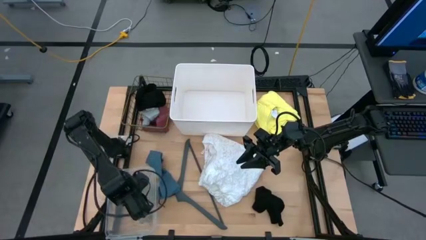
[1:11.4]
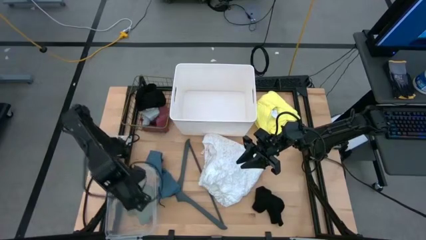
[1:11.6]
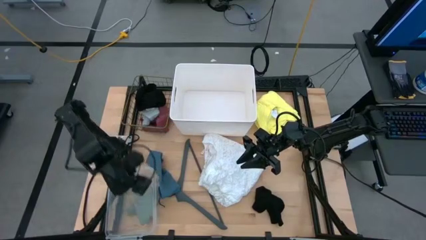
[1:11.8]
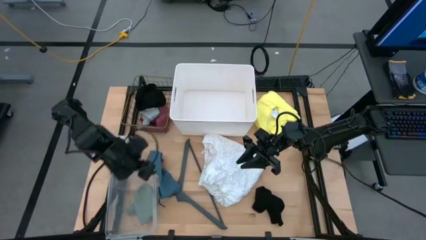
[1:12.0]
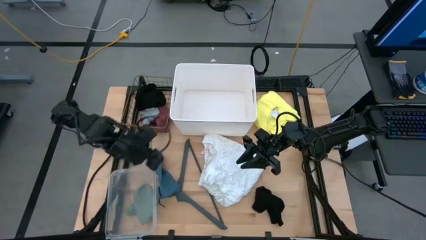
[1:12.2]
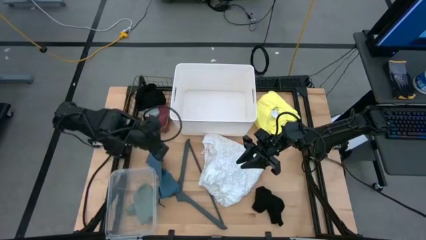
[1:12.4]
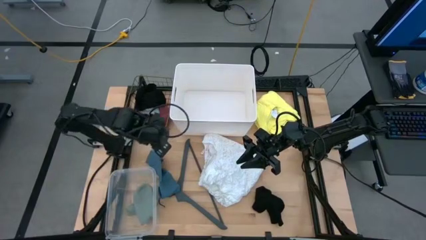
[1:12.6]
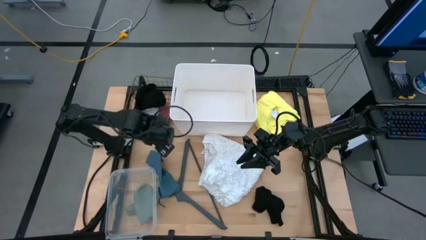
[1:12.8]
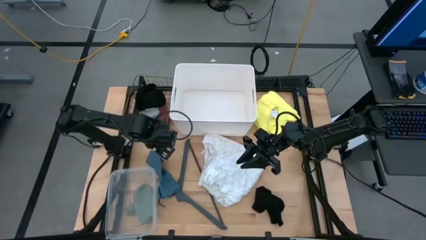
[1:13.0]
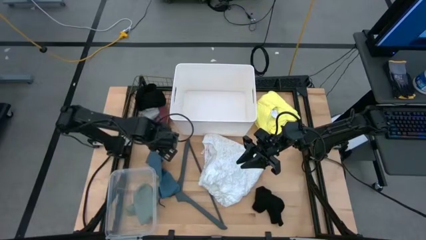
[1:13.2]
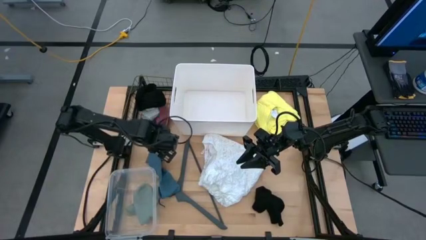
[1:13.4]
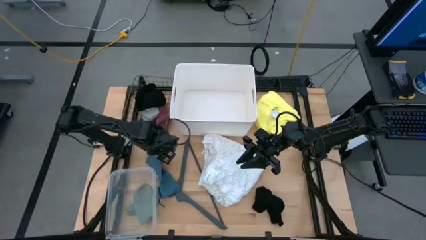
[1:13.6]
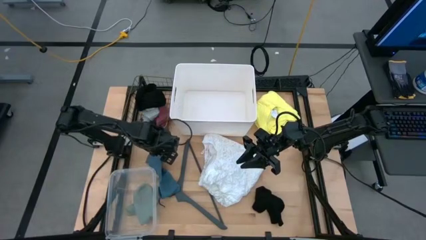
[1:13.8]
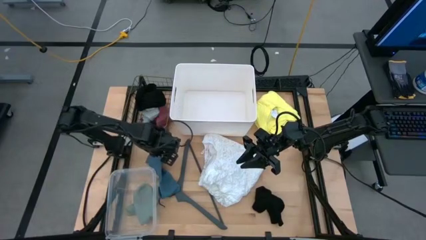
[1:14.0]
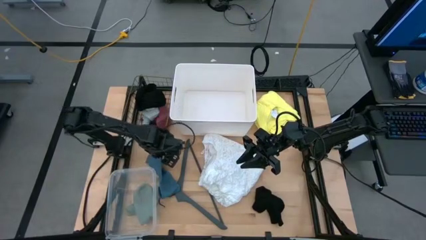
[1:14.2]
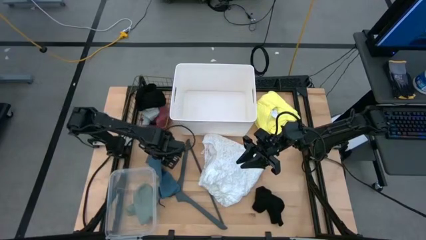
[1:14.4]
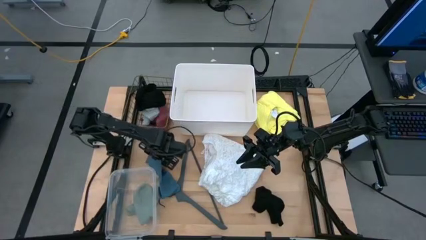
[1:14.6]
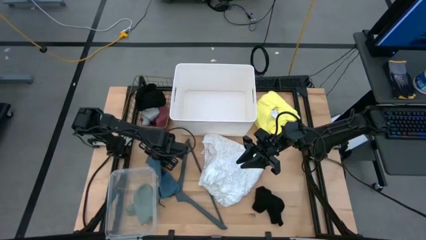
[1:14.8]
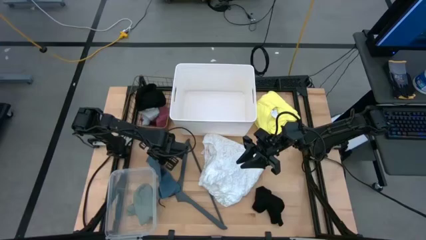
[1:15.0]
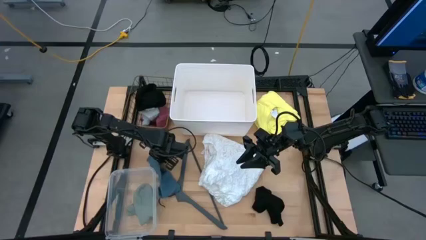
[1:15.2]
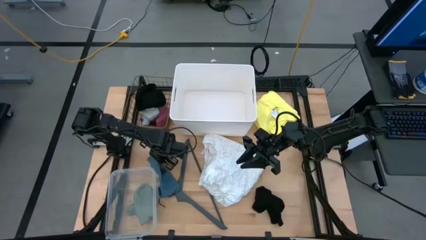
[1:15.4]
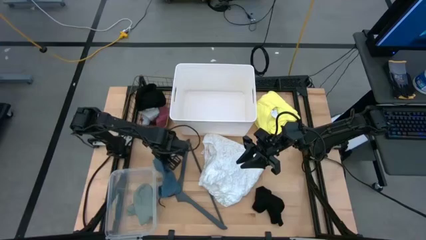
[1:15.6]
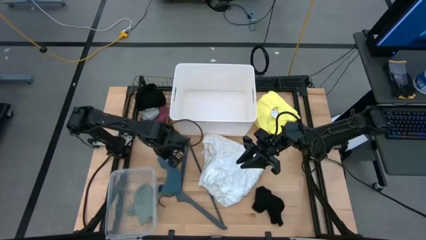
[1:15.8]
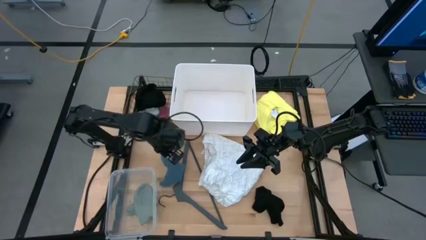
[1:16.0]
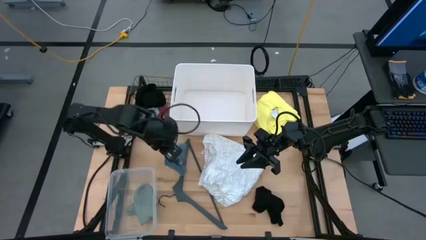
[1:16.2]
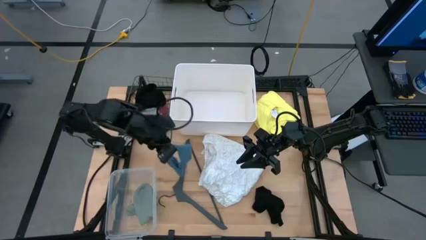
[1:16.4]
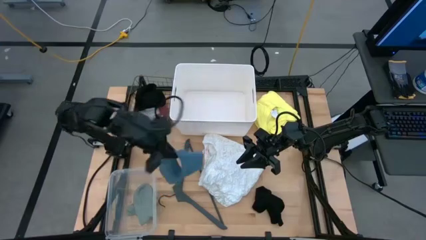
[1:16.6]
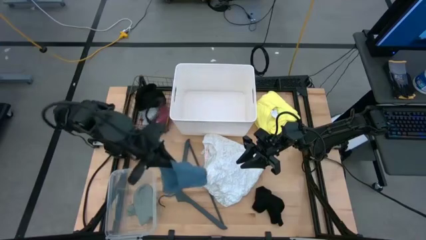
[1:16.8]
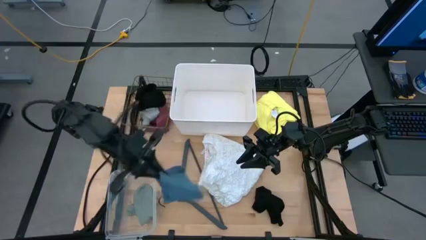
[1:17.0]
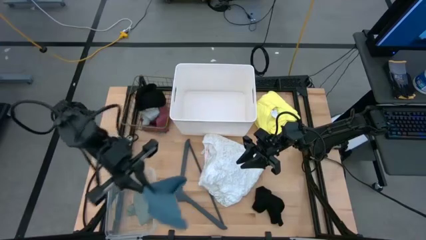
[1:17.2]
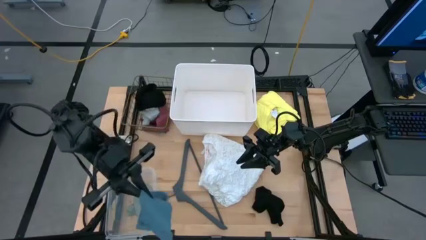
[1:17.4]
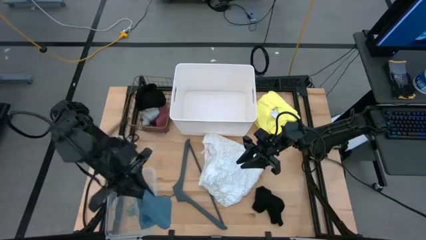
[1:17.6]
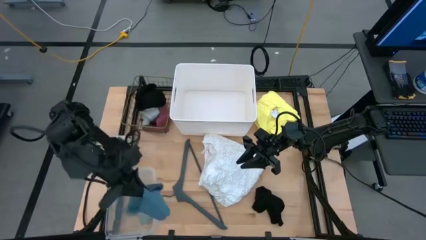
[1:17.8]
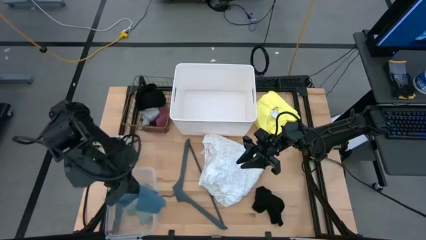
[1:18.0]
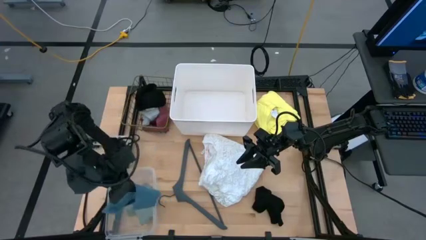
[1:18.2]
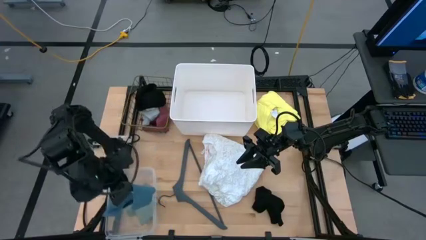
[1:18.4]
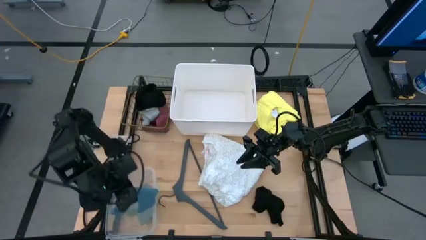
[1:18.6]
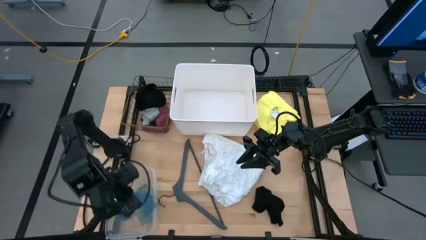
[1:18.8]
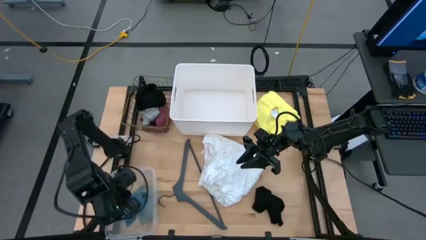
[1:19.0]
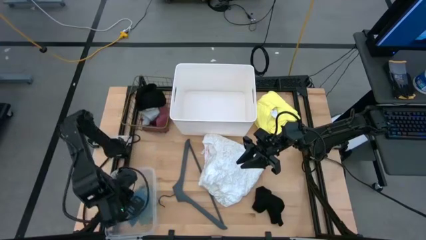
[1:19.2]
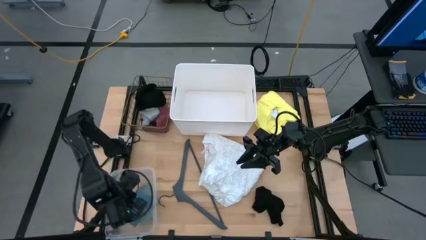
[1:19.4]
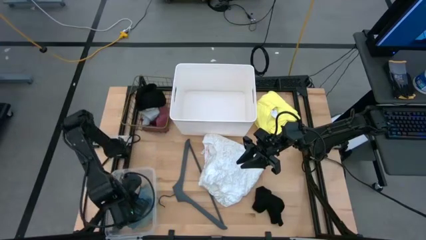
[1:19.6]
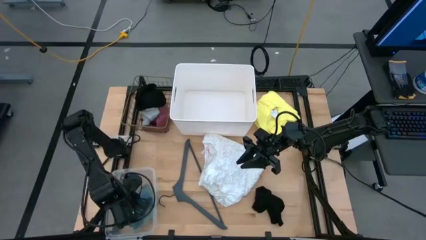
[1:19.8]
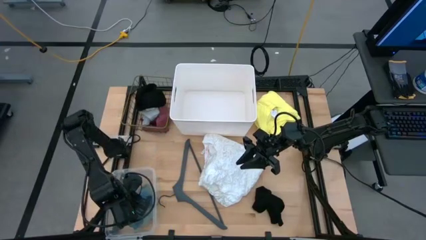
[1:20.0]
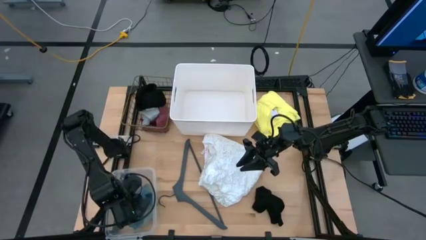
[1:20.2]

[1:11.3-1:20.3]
Task: Pick & Place Cloths
Put the dark gray sock into the transparent bin

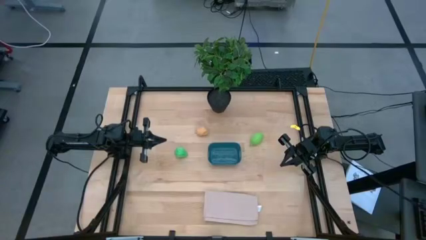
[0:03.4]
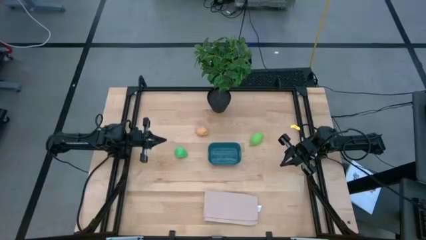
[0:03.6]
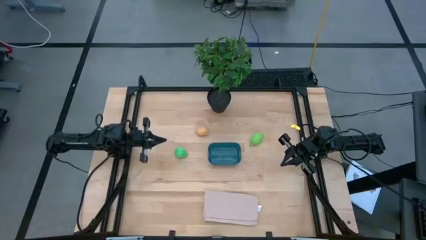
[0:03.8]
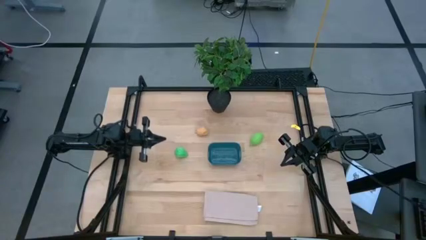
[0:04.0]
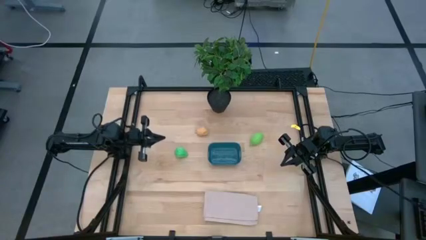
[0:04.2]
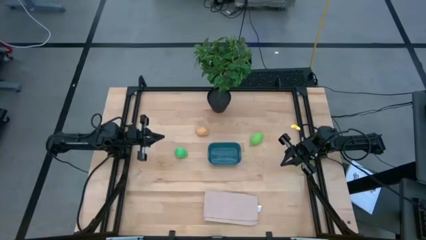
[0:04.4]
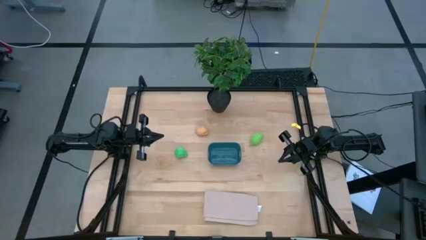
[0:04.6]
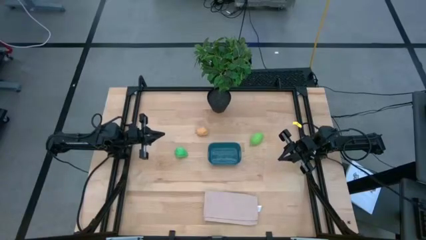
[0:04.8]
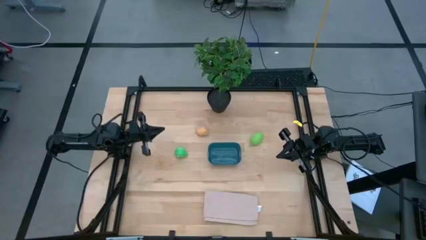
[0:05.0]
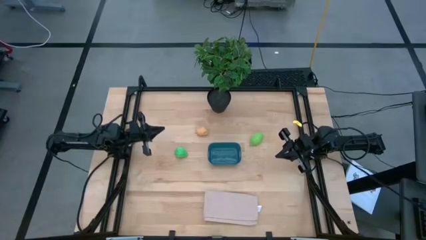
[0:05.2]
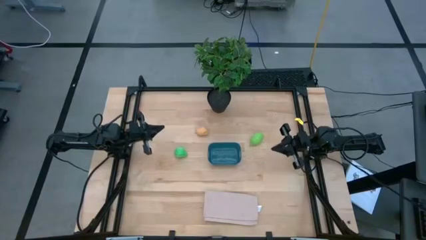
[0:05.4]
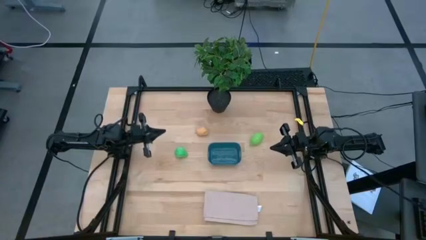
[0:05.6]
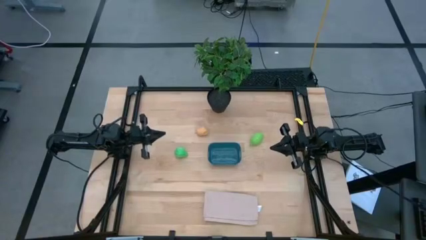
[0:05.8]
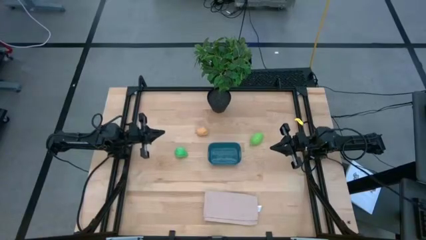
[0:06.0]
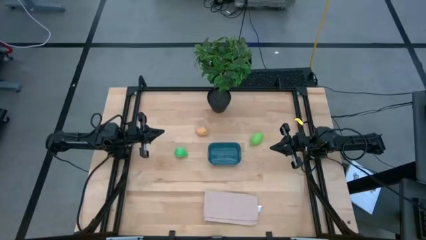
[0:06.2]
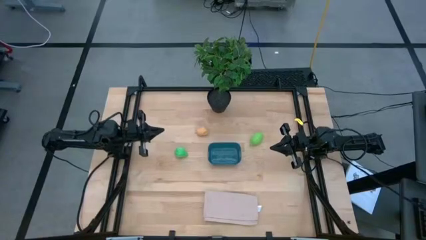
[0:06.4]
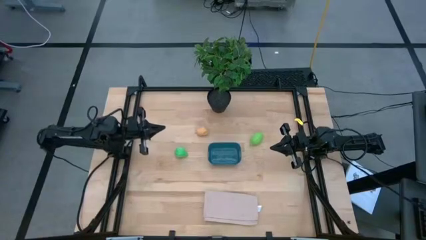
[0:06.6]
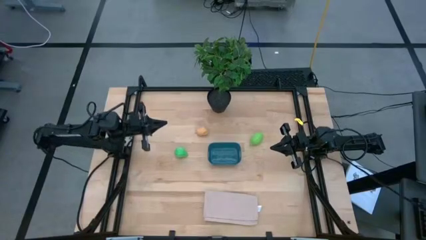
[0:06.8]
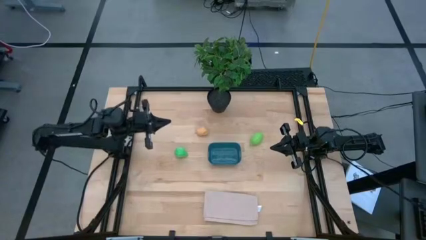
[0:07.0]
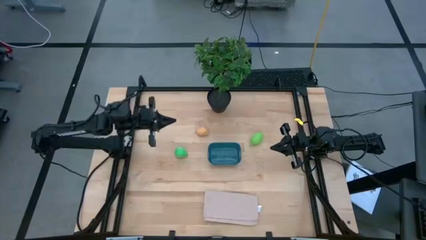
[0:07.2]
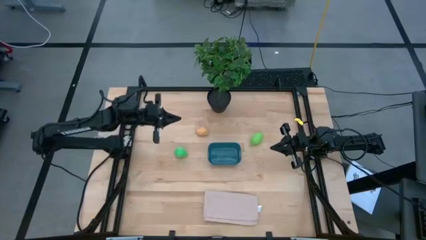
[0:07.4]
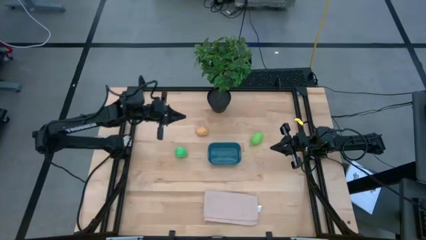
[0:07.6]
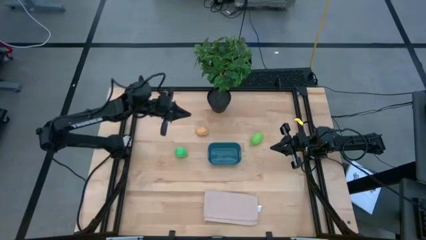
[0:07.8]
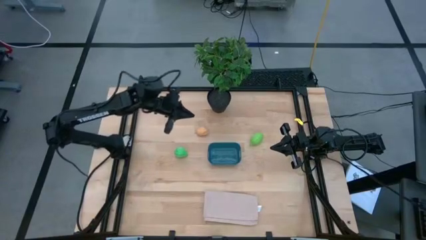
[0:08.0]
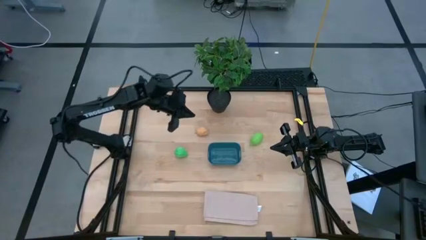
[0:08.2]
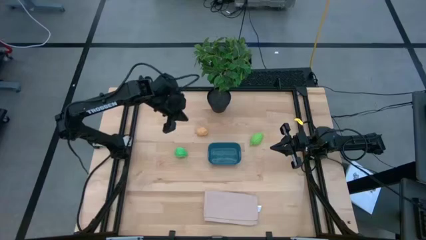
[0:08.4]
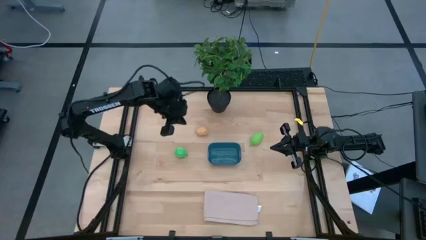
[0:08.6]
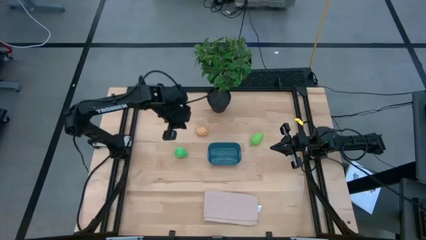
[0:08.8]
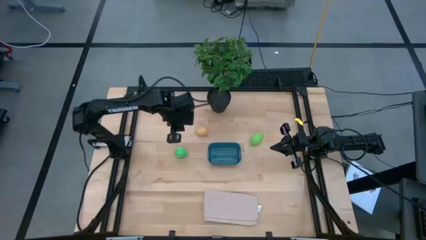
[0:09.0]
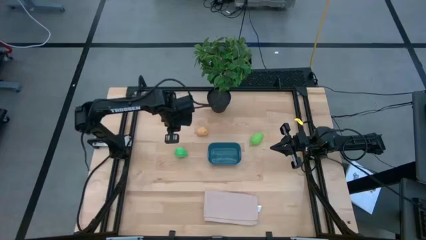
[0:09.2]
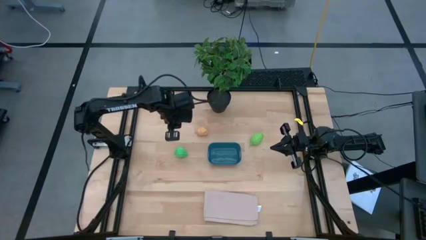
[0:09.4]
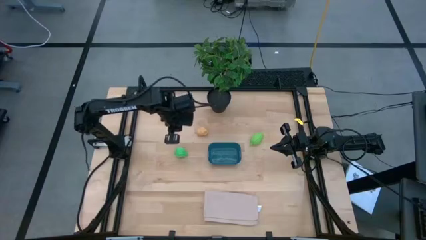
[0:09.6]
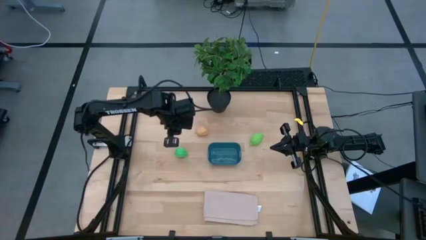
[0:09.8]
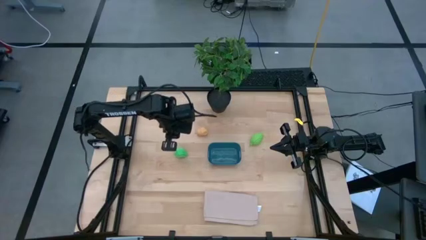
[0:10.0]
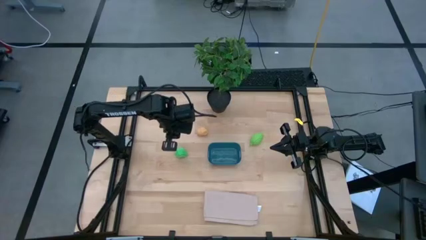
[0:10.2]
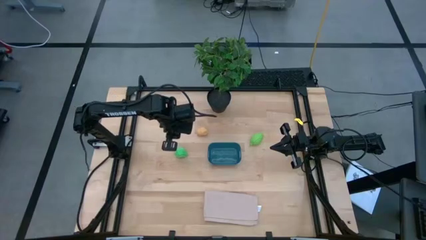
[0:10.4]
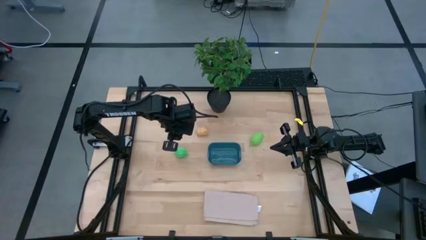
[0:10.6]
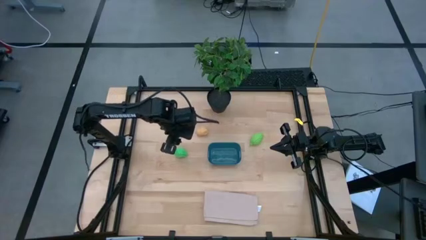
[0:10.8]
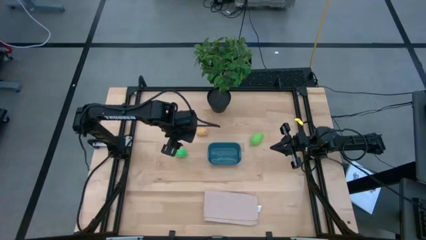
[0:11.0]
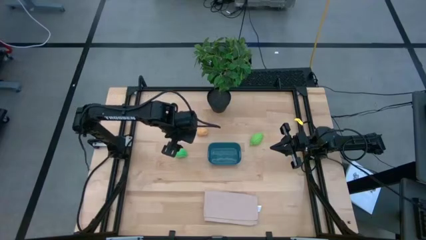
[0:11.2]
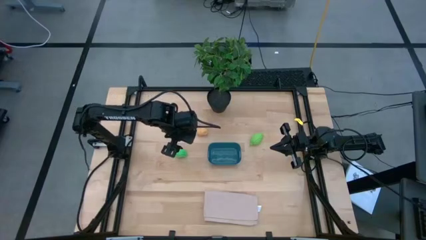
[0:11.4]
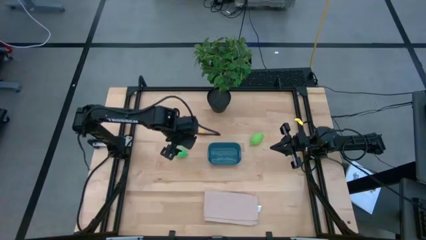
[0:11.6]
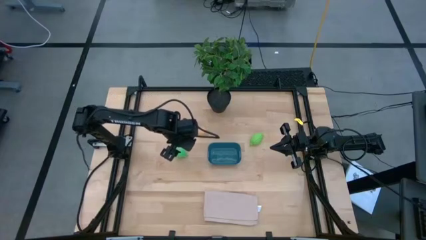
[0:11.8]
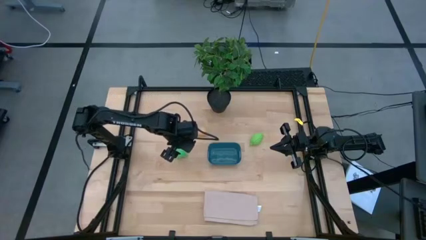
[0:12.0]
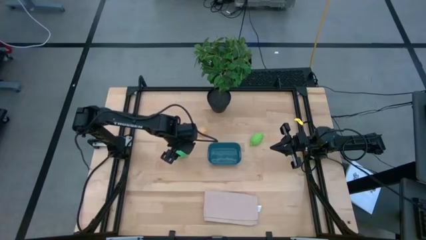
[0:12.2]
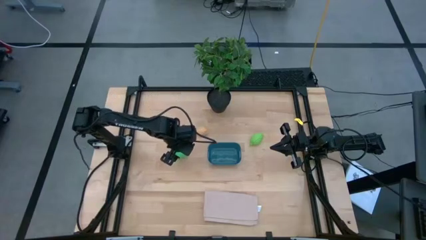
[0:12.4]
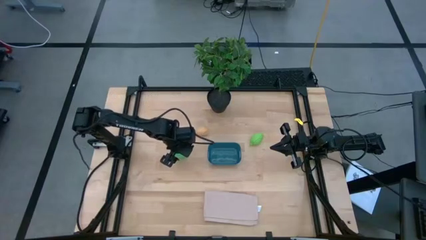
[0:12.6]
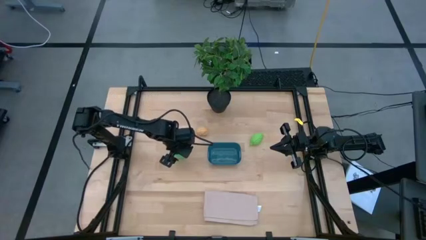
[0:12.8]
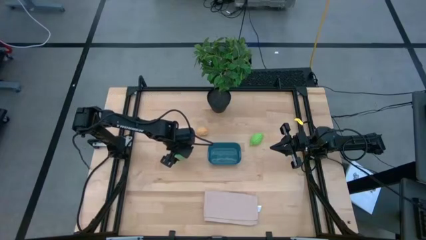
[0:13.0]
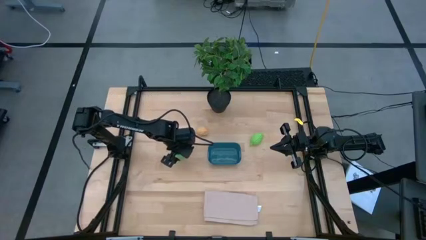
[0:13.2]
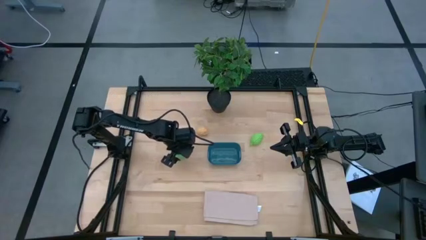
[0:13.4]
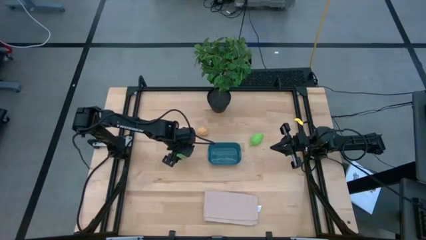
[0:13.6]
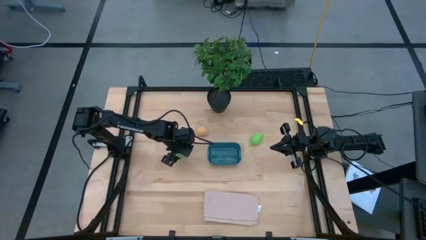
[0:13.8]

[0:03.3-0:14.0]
Task: Pick and placing Produce into tupperware
Put the avocado into the blue container
